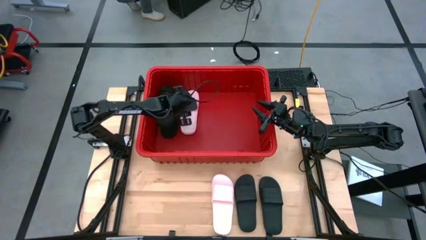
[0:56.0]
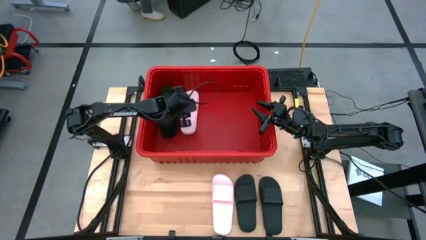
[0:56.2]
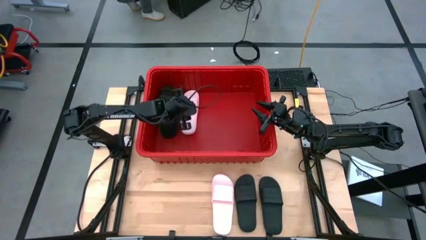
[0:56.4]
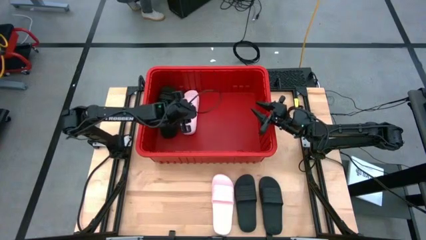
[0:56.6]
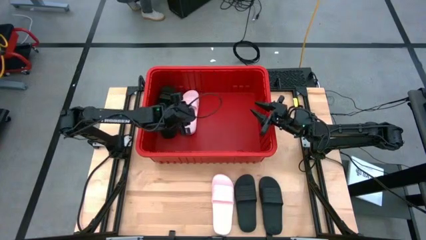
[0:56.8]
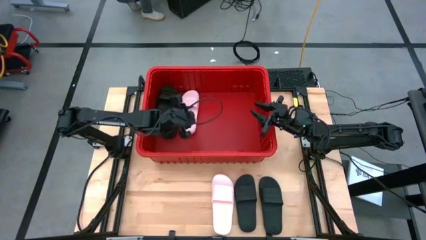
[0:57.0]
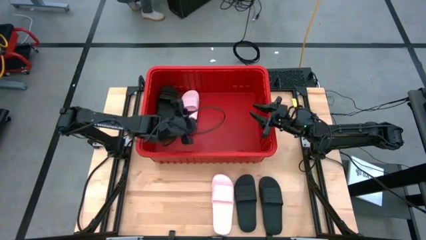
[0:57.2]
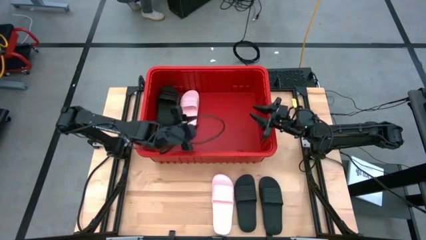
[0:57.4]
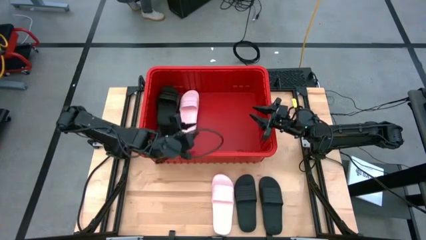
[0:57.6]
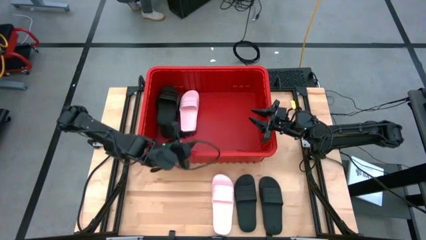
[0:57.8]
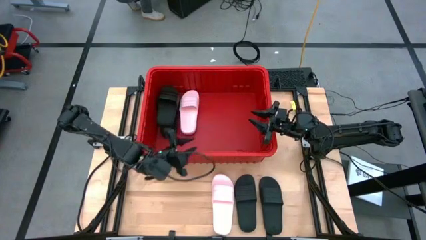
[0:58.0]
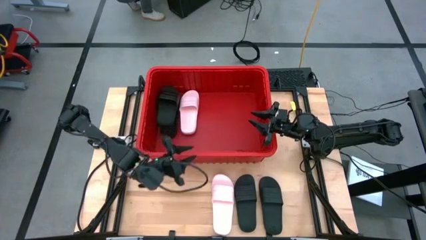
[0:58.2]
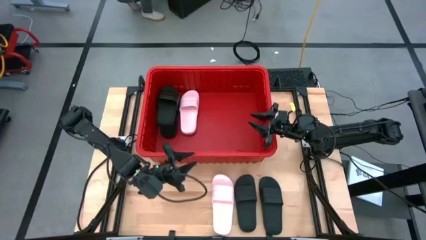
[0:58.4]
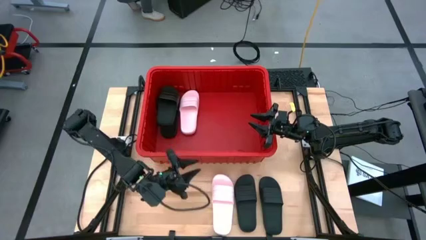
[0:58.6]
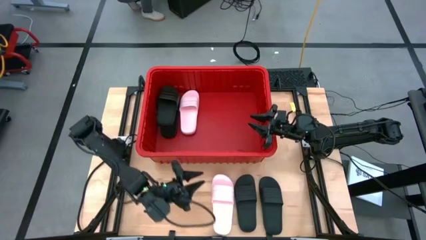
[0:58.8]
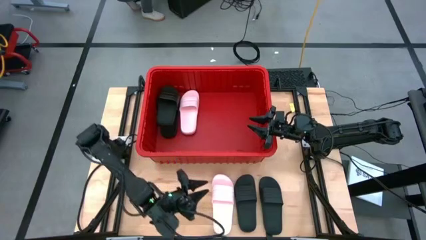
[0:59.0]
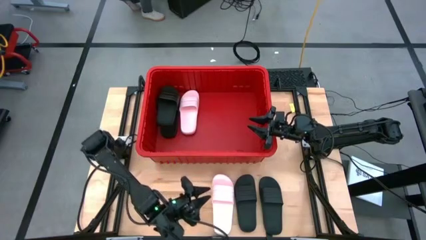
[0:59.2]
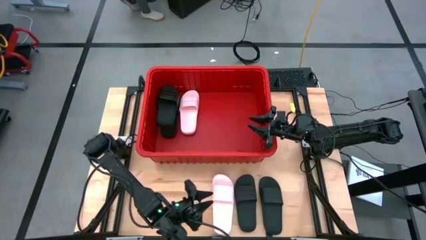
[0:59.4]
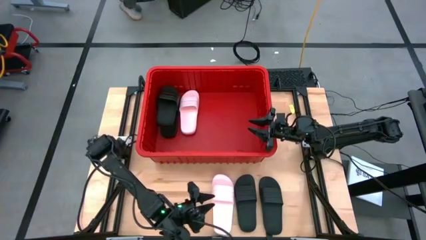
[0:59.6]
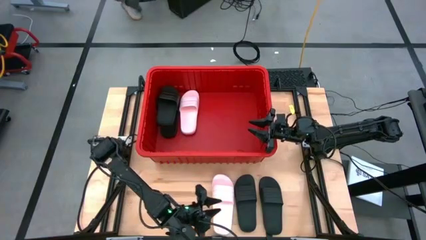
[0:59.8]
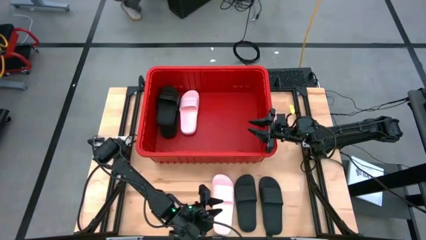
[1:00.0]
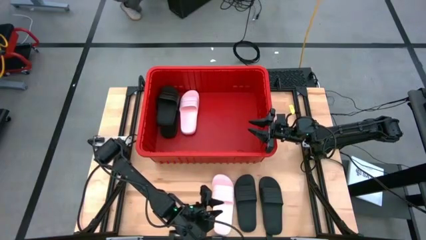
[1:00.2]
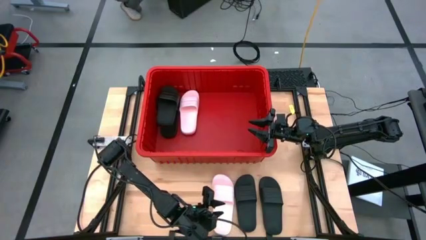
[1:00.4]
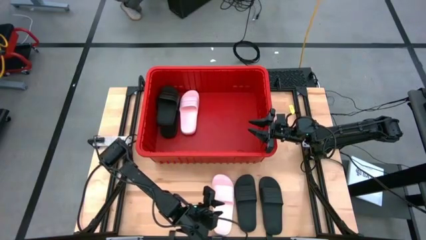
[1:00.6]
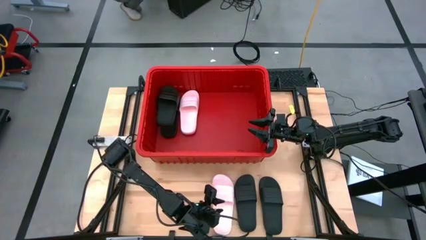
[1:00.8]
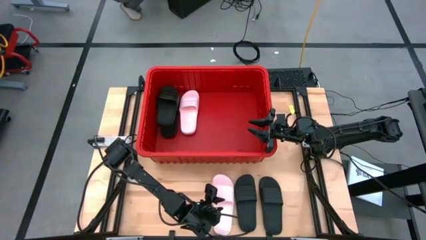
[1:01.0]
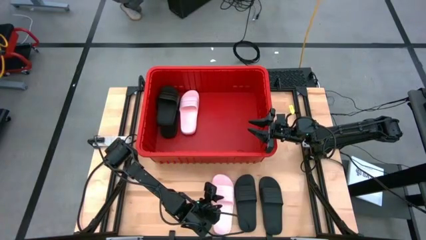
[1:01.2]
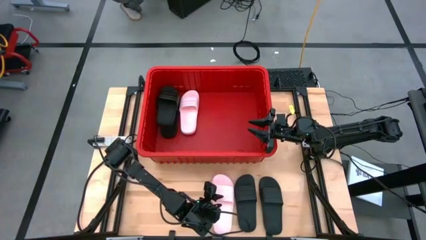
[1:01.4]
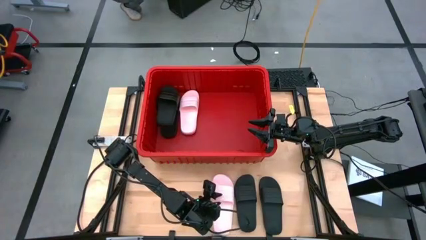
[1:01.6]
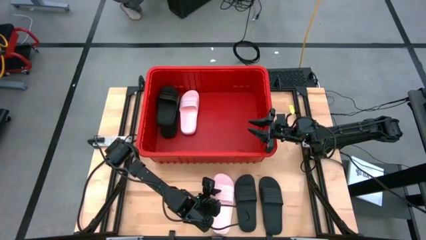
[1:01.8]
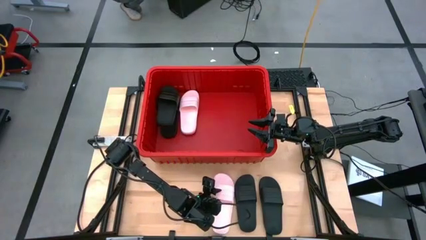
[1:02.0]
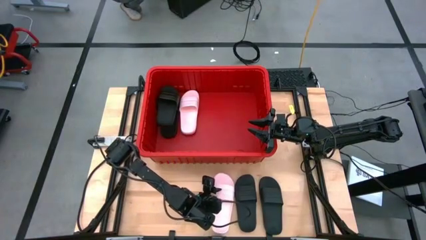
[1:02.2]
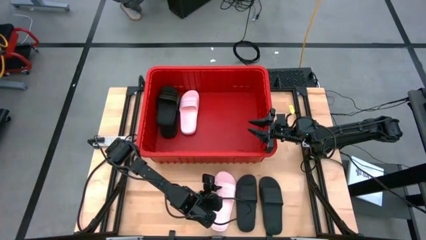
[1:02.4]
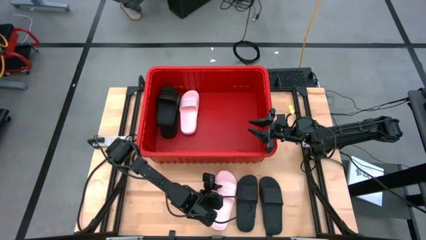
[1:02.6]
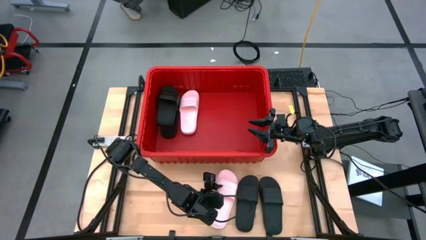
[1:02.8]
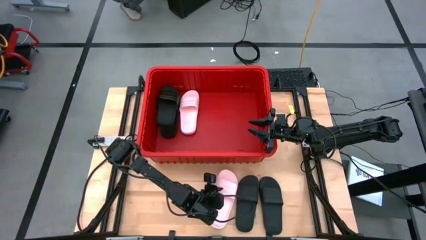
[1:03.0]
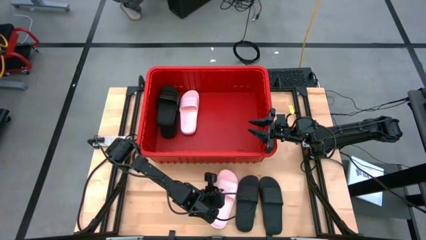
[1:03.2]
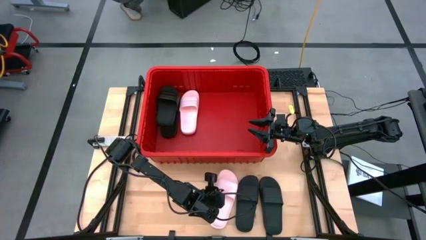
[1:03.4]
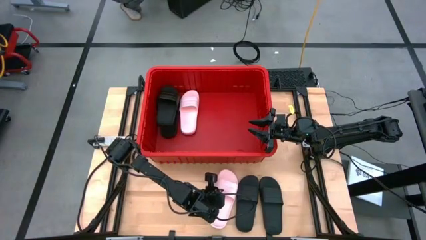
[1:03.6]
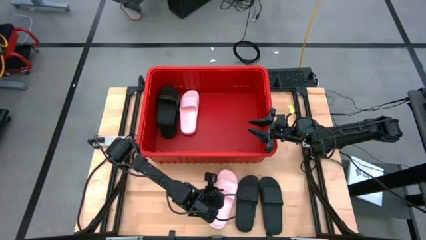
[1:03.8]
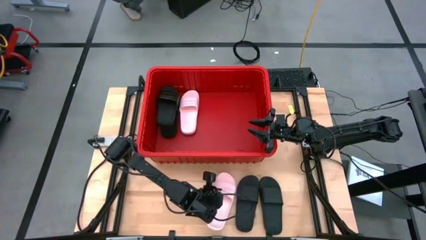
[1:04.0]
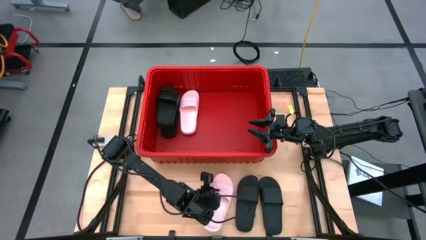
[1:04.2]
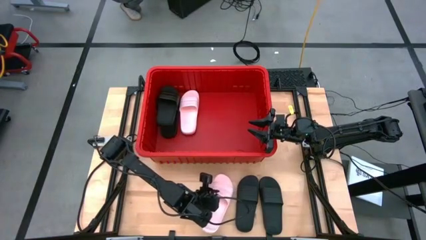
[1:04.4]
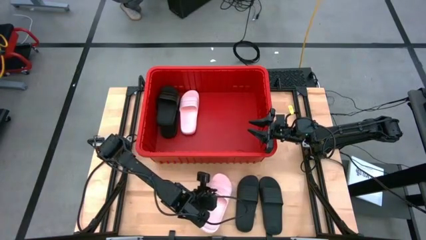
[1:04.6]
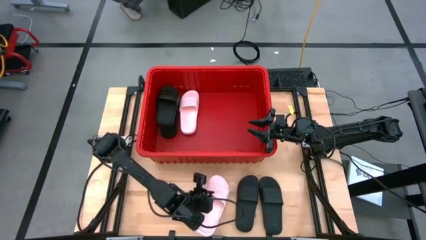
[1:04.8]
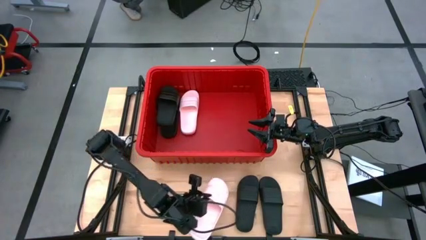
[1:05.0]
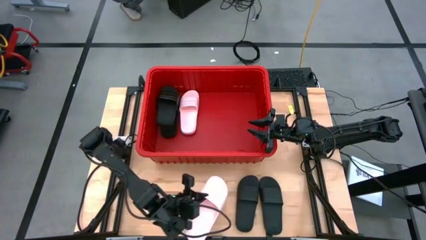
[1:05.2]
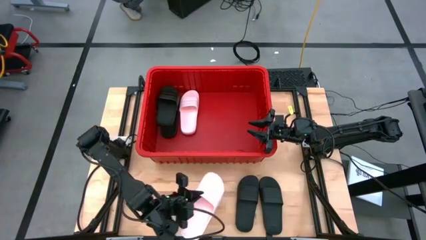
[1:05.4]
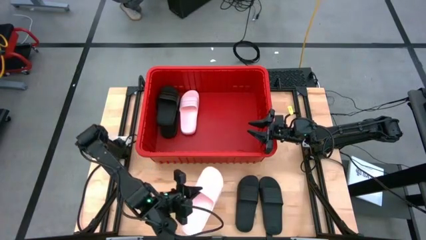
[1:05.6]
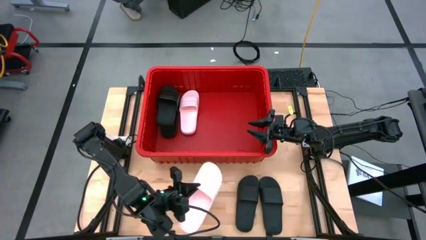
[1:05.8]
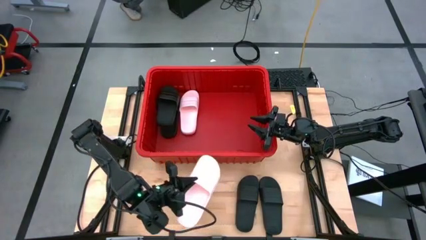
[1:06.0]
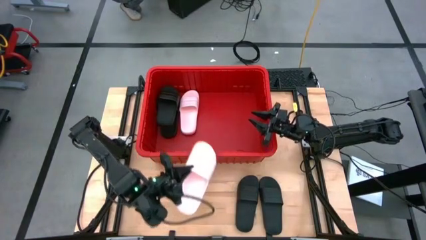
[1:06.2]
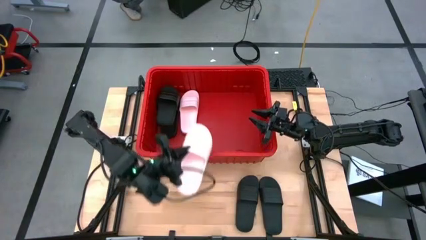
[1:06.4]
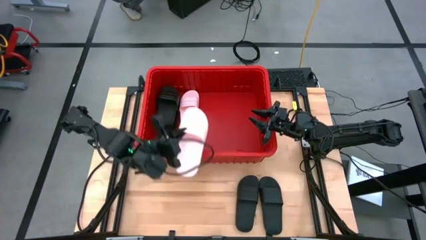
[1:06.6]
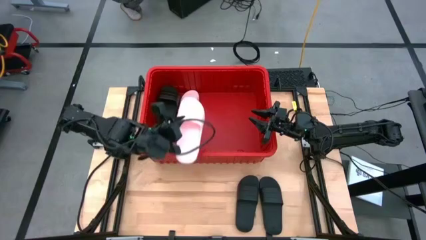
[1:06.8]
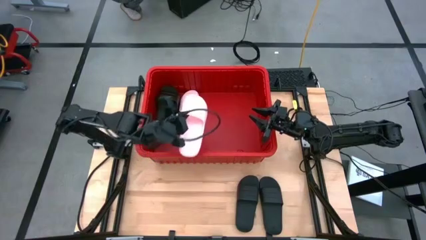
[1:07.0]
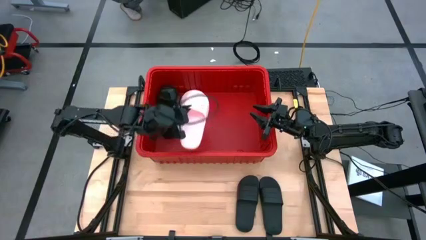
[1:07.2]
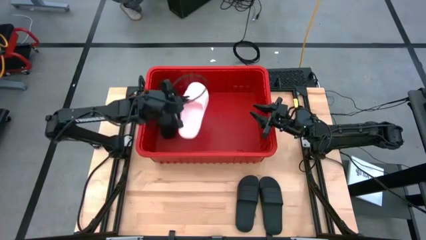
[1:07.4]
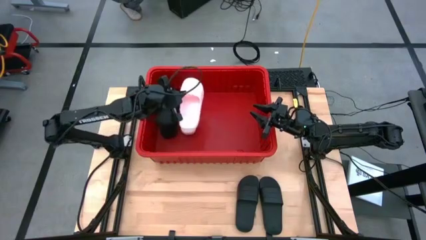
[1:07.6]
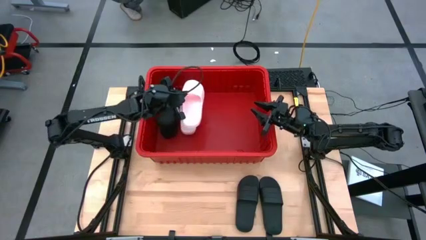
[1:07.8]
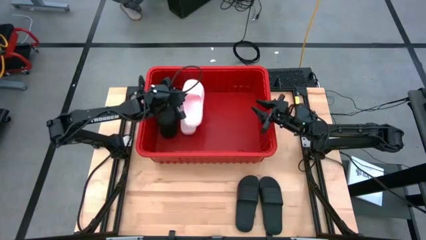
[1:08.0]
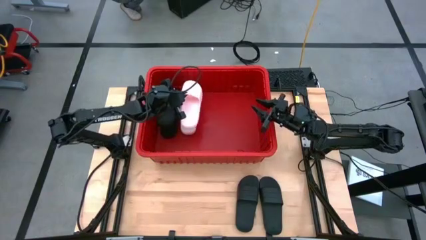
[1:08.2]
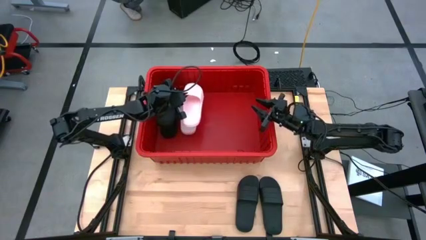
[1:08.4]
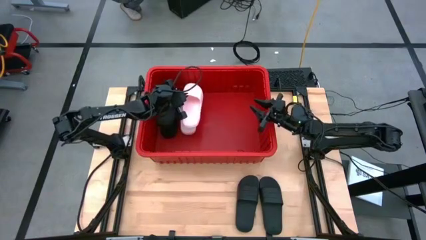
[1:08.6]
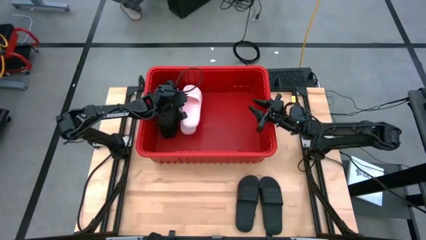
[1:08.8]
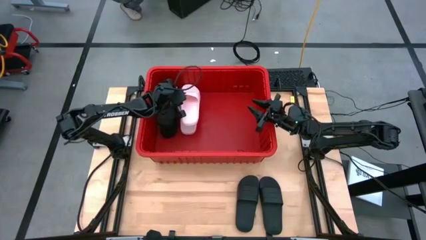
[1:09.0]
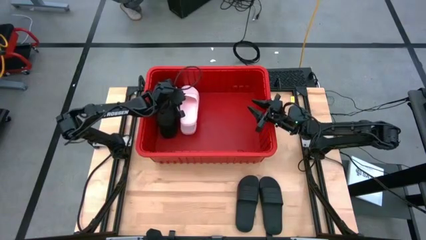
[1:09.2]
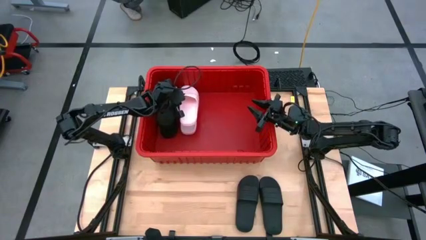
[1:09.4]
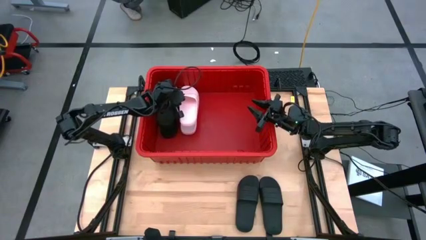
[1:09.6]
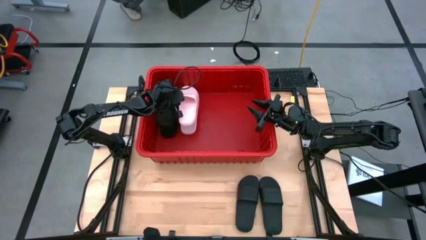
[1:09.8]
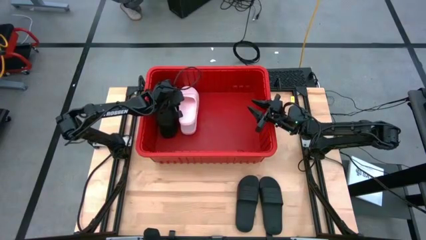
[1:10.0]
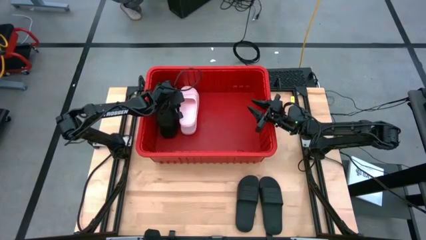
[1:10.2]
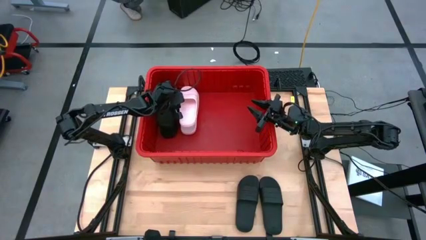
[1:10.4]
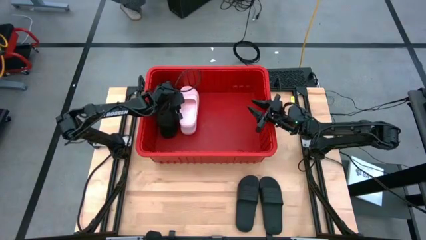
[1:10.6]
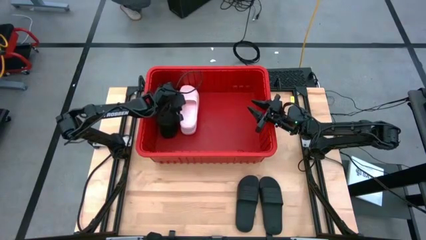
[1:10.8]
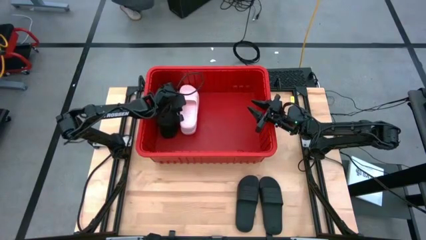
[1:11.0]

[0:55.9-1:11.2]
Task: Pick and place slides into bin
Put the pink slipper into the pink slipper
